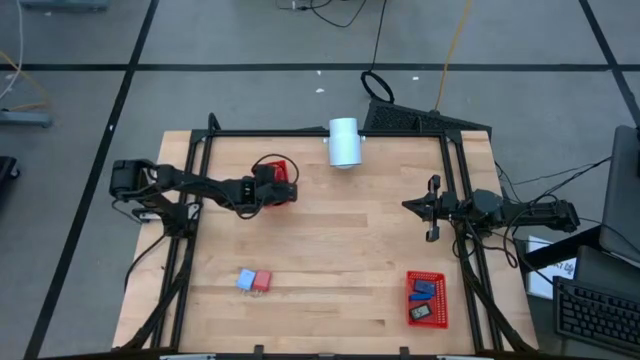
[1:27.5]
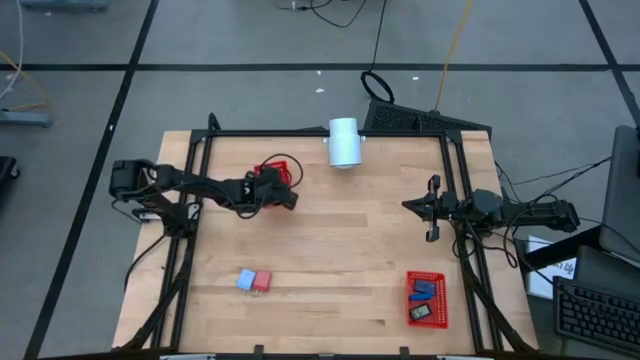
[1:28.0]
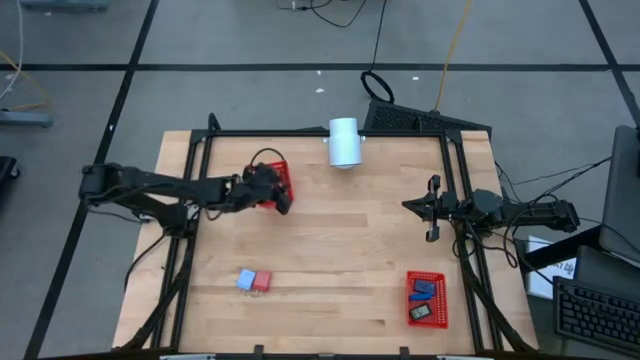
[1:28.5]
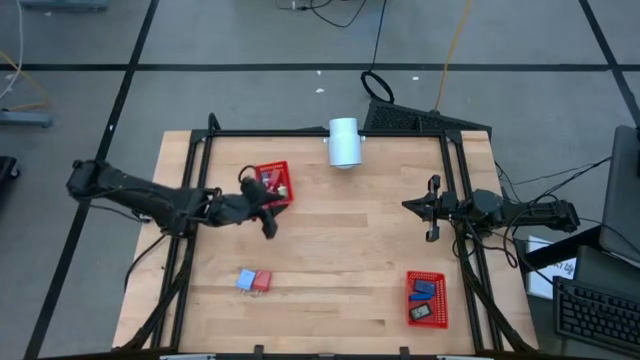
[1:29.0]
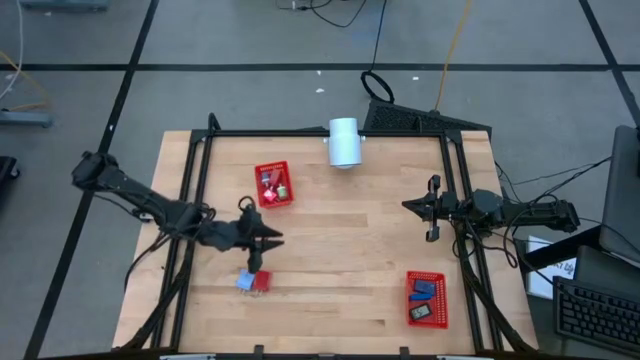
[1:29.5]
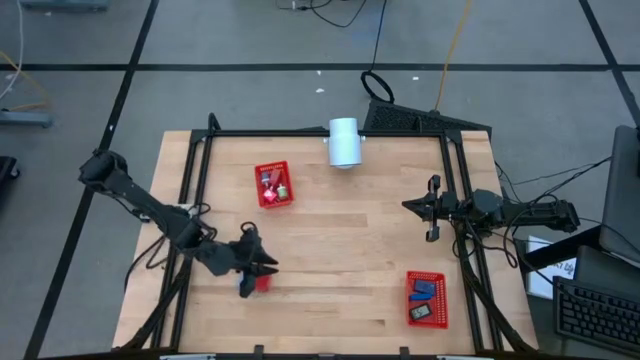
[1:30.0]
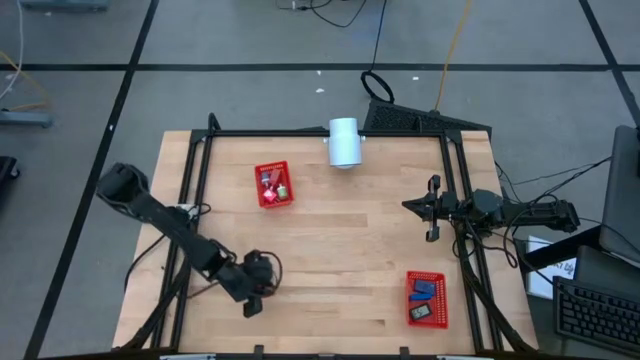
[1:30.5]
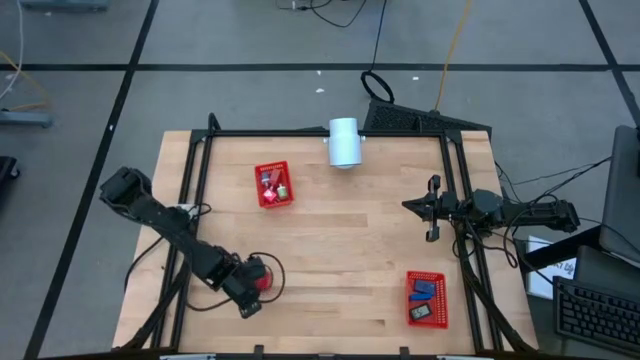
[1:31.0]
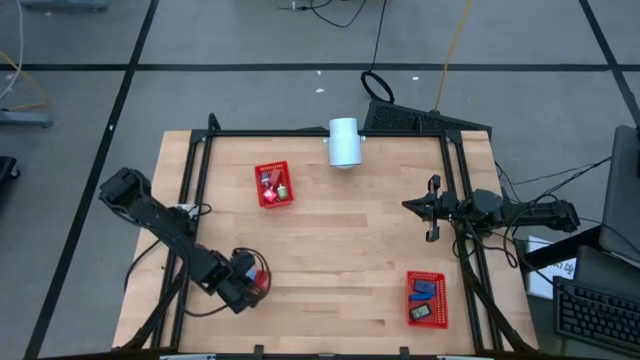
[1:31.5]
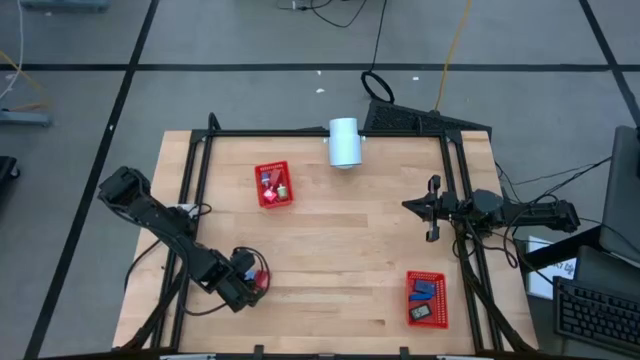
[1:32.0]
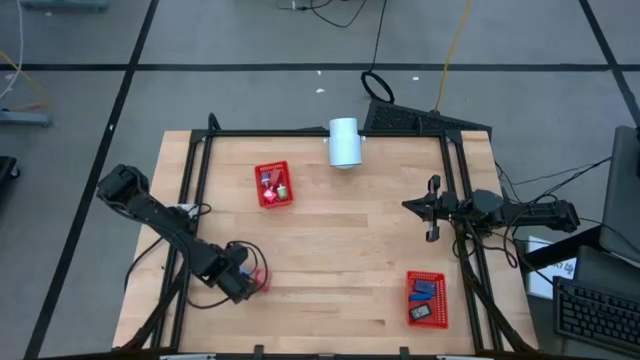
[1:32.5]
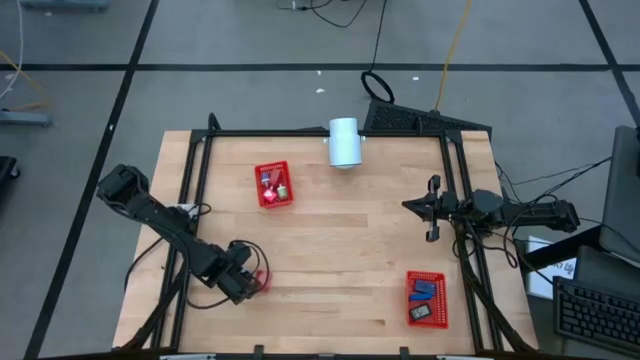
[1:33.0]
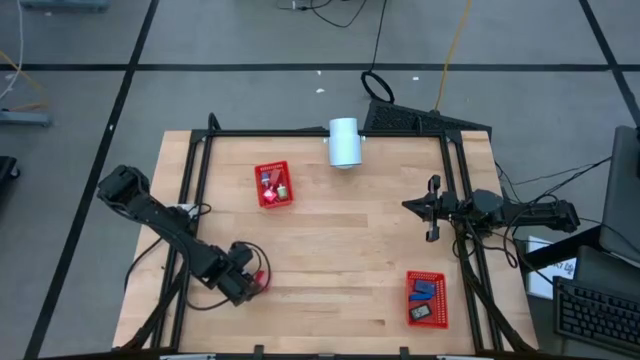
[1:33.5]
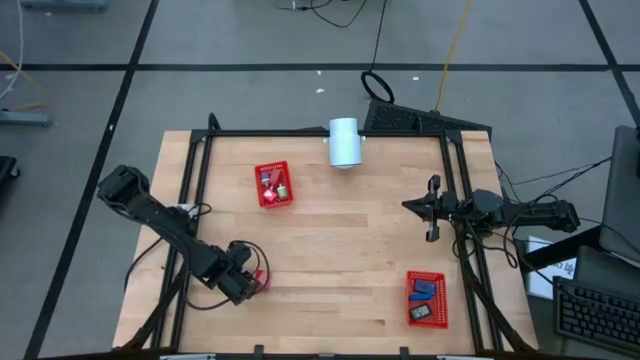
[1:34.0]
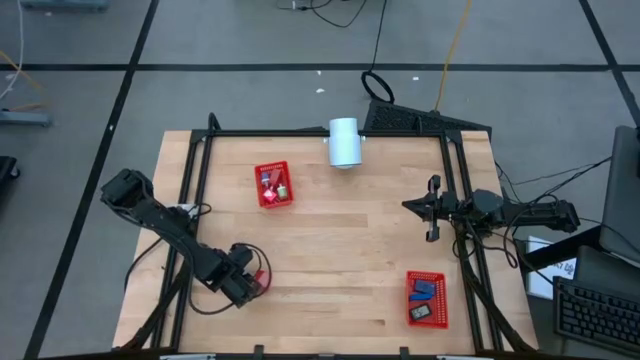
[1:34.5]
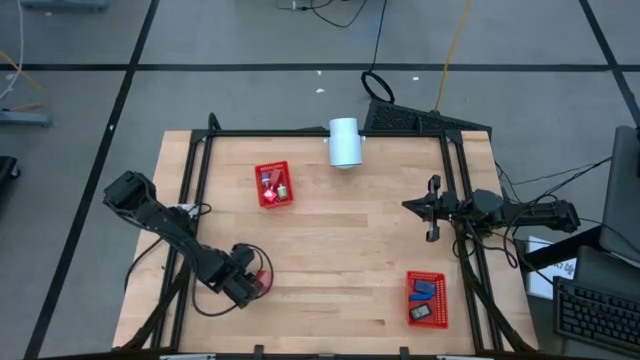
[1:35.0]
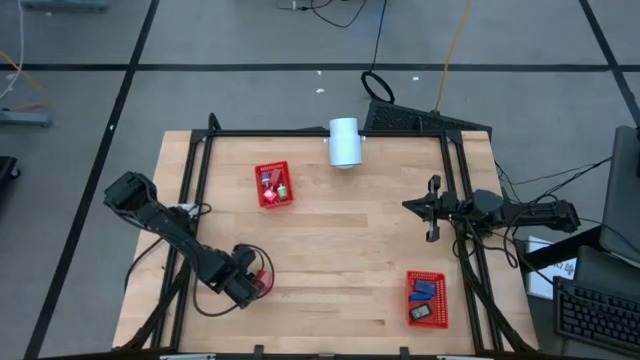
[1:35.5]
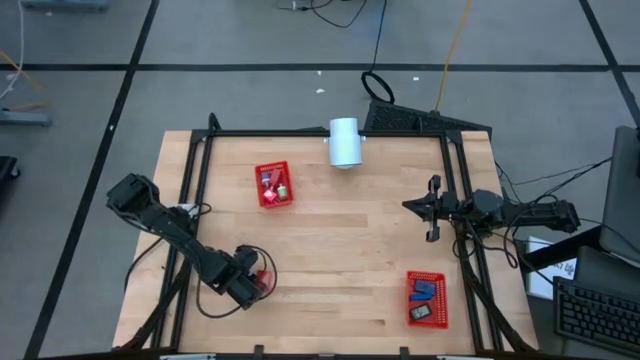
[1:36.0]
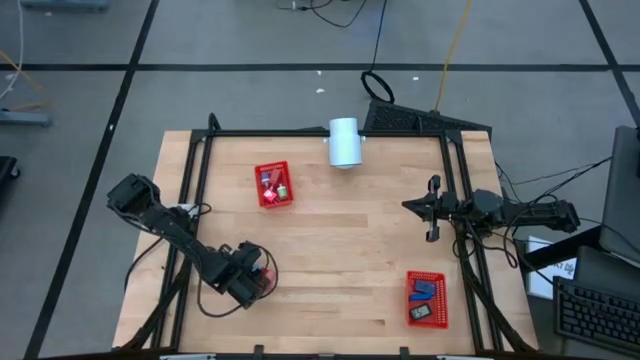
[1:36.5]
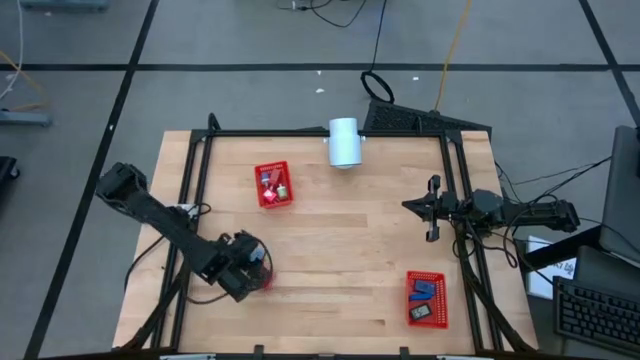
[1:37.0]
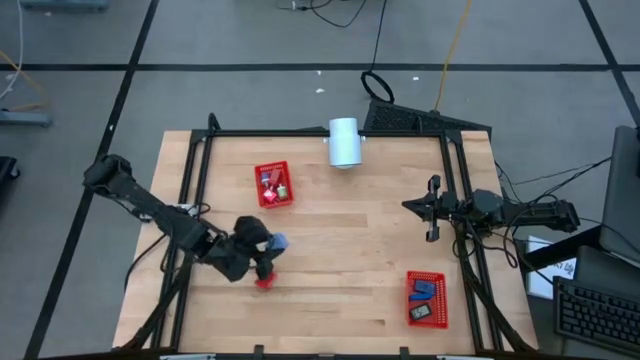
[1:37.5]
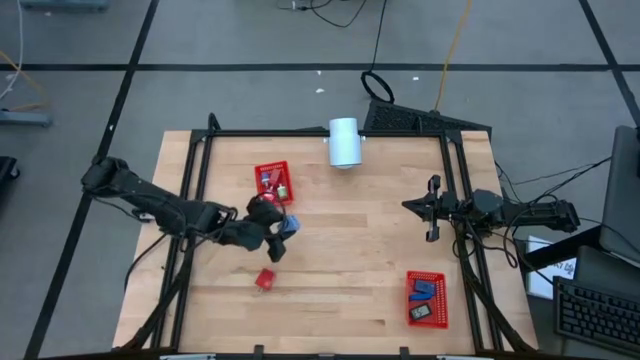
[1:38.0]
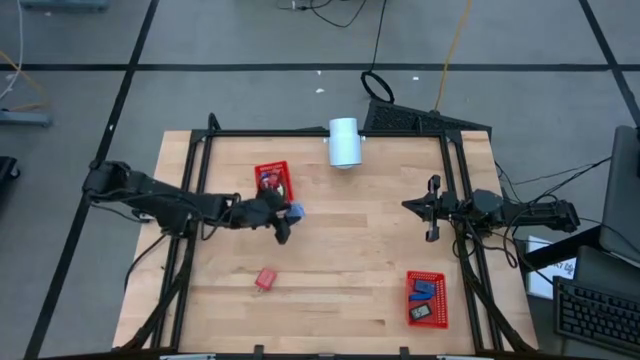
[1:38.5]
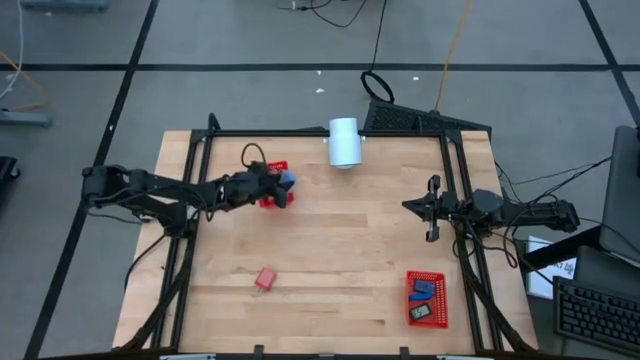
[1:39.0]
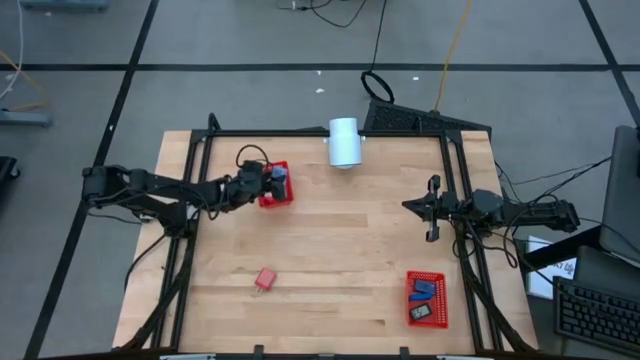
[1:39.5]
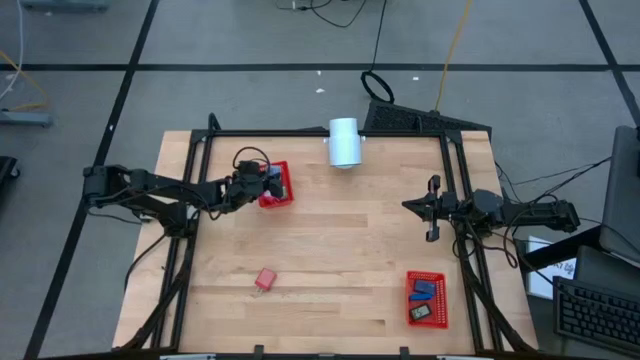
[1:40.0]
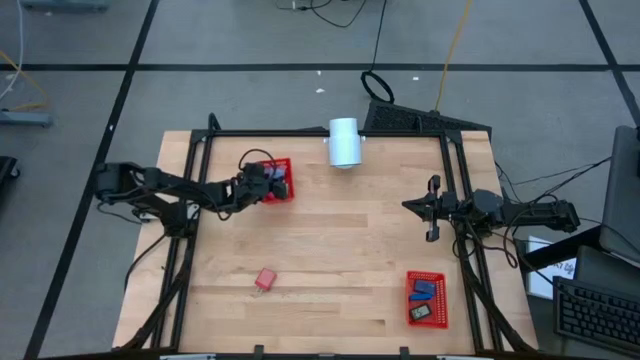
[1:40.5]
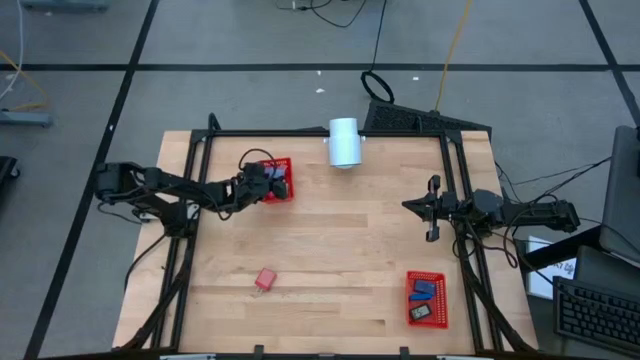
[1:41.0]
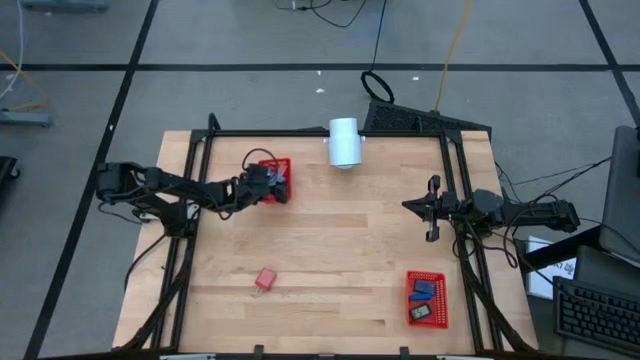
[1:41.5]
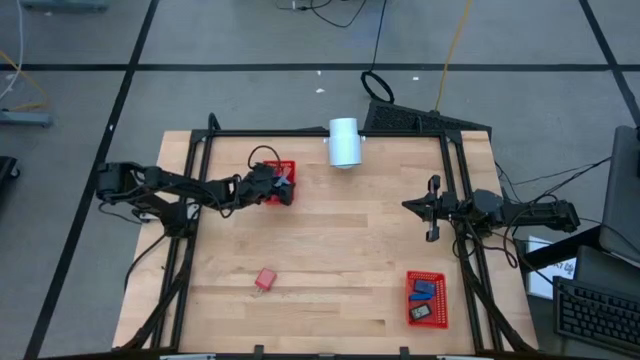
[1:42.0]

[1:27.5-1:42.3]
Task: Pick & Place Office items
Put the blue charger adapter into the top red bin

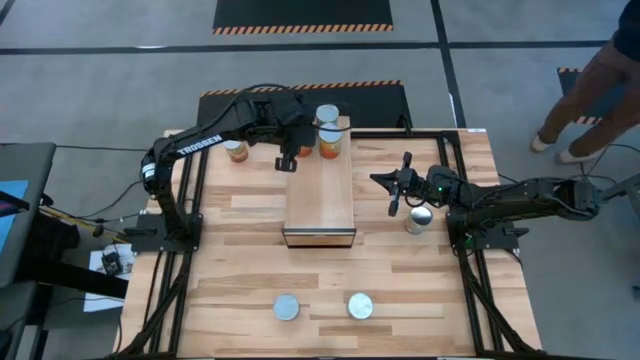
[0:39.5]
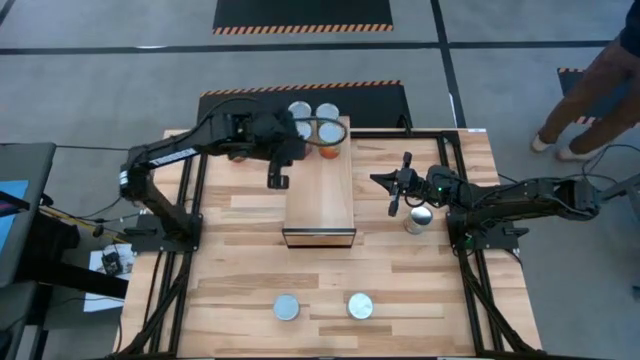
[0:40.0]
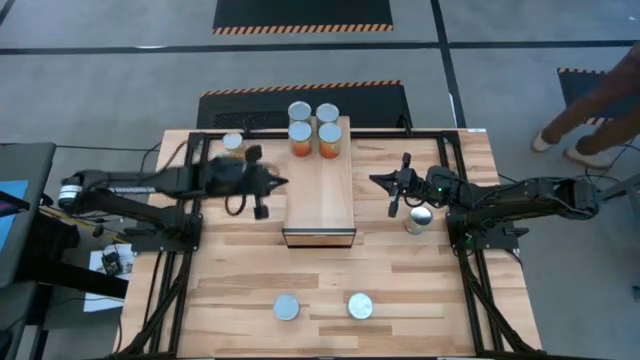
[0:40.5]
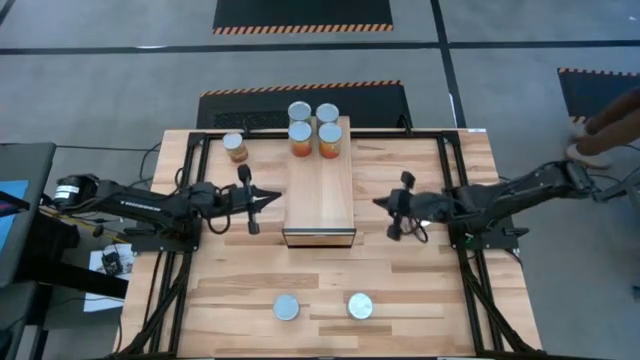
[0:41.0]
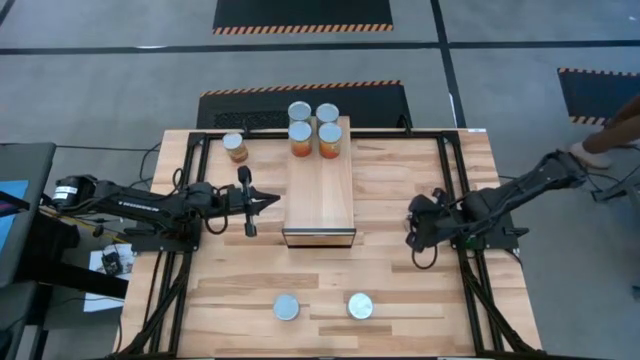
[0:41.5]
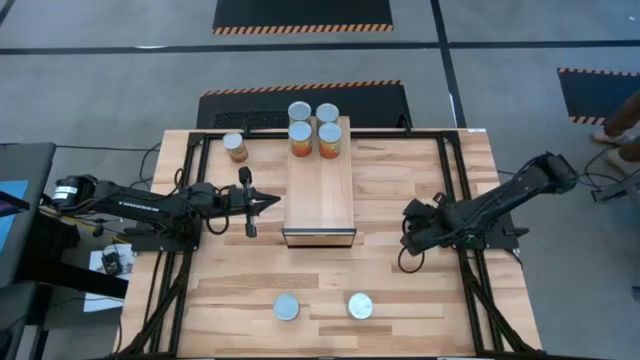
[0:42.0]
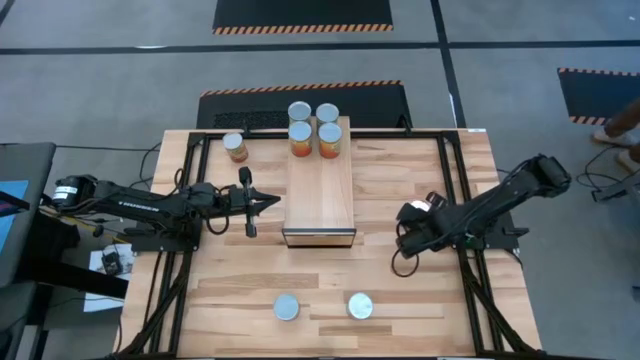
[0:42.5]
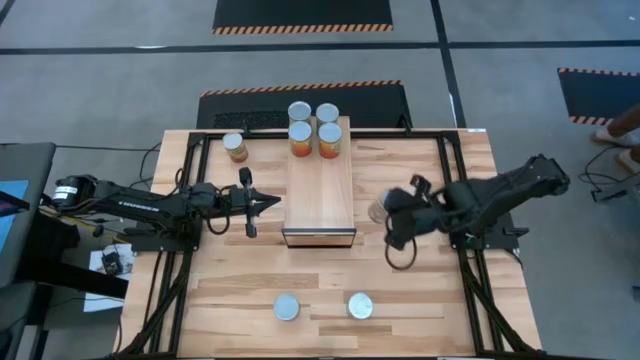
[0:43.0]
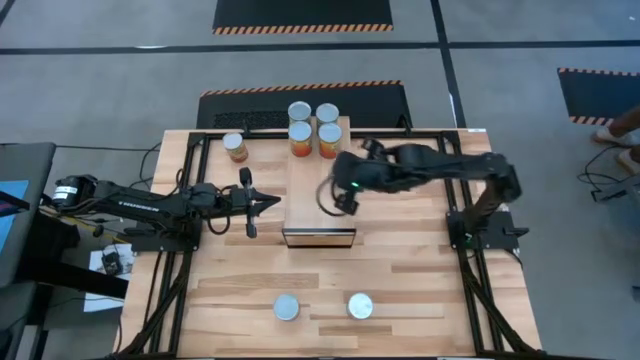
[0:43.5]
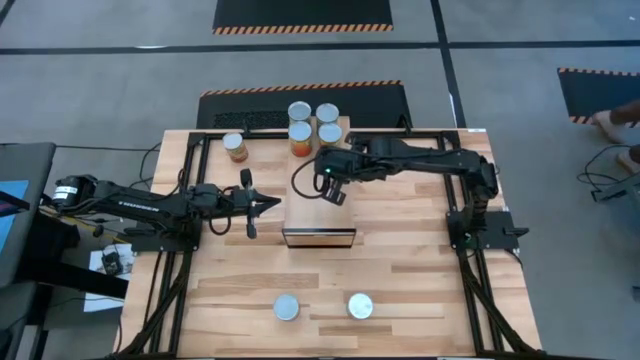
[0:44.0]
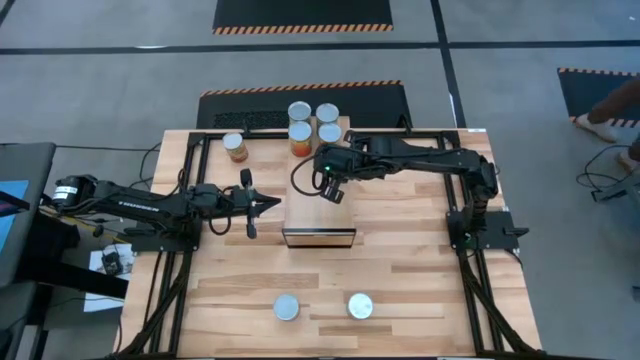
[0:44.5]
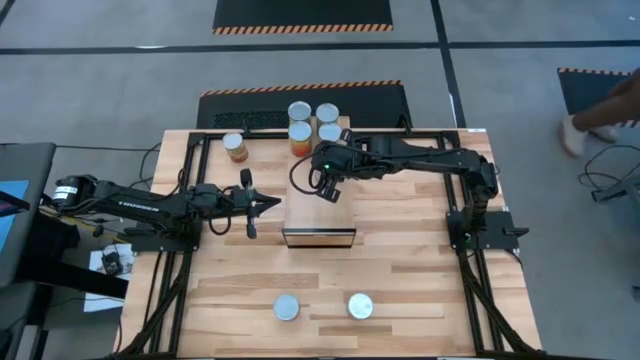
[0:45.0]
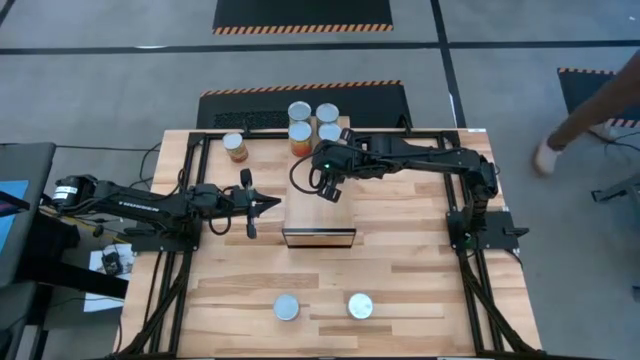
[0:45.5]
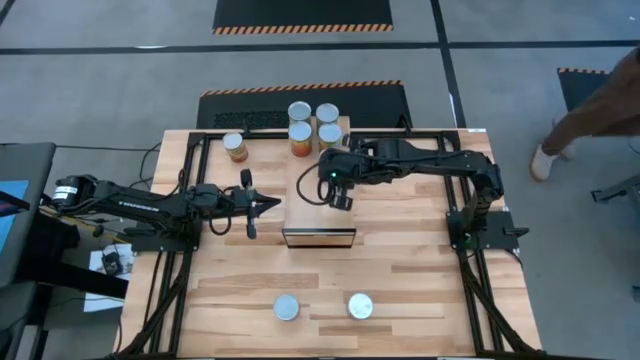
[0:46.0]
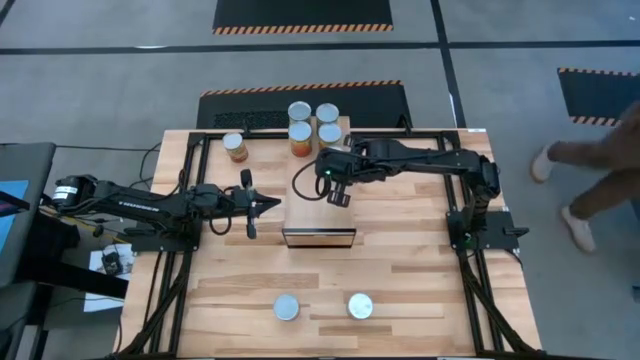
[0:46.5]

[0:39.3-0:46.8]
Task: Pick and place cans onto a shelf
Put the top canned peaches on the shelf
